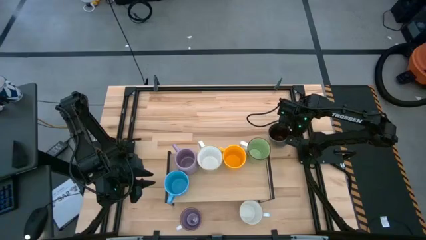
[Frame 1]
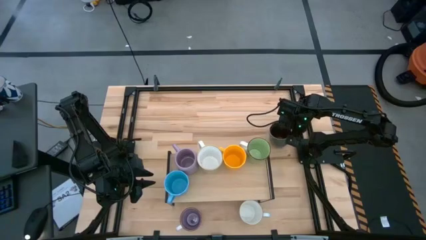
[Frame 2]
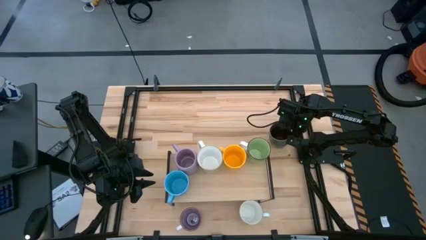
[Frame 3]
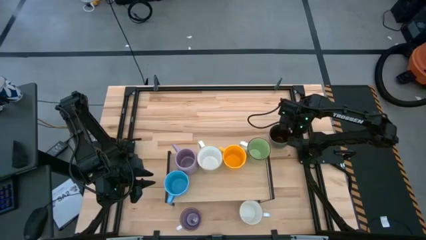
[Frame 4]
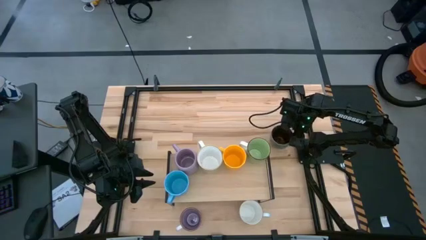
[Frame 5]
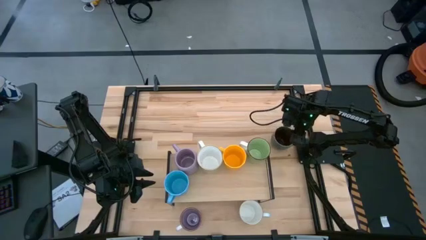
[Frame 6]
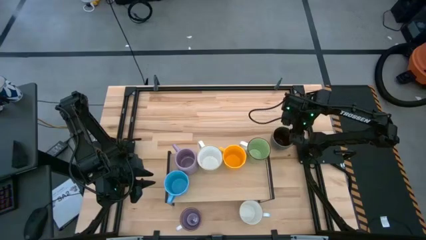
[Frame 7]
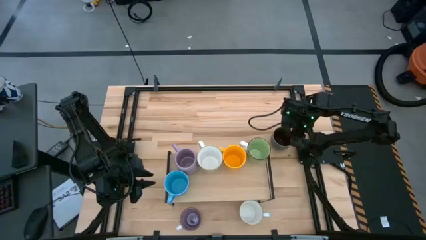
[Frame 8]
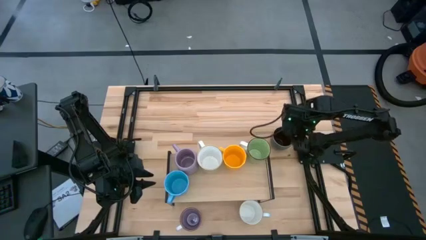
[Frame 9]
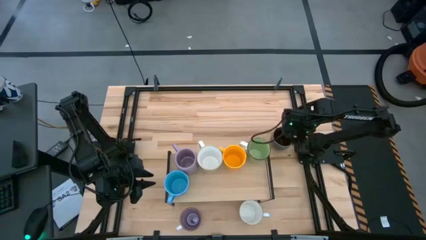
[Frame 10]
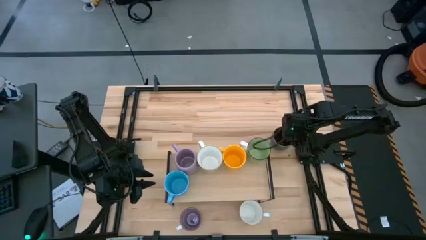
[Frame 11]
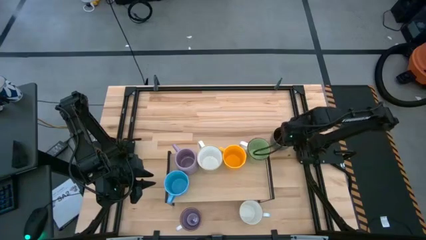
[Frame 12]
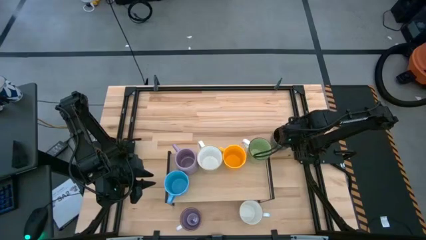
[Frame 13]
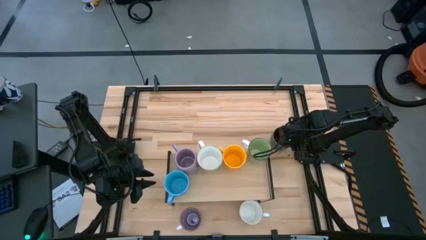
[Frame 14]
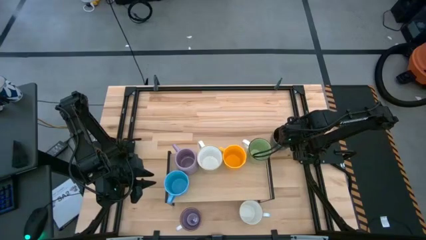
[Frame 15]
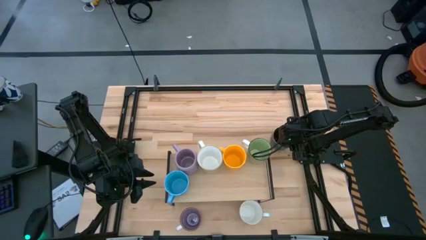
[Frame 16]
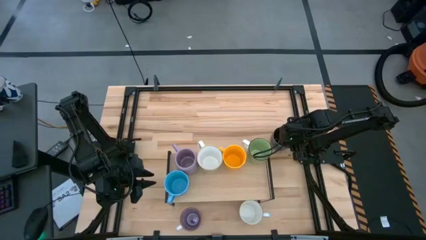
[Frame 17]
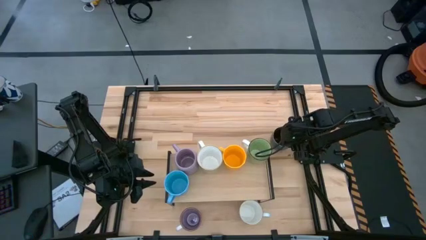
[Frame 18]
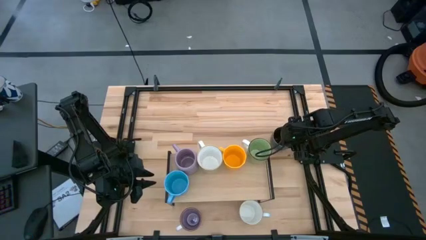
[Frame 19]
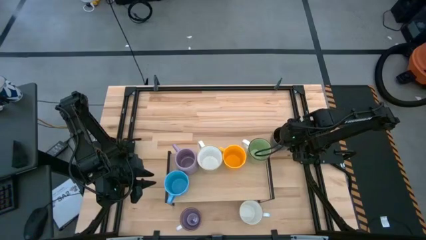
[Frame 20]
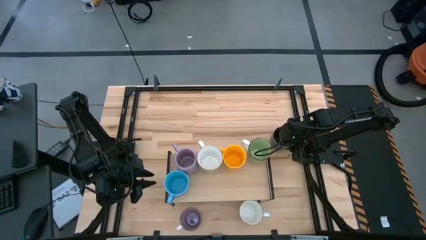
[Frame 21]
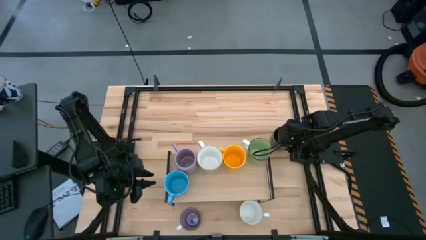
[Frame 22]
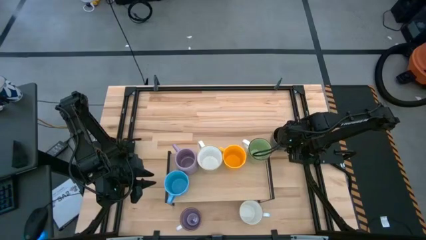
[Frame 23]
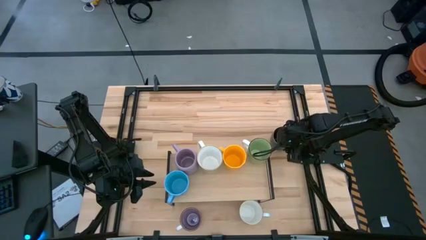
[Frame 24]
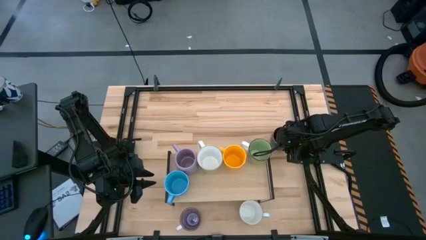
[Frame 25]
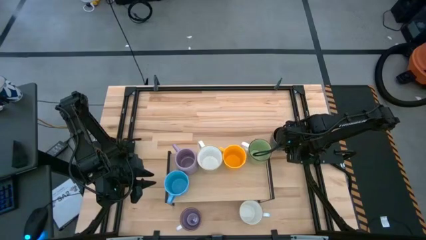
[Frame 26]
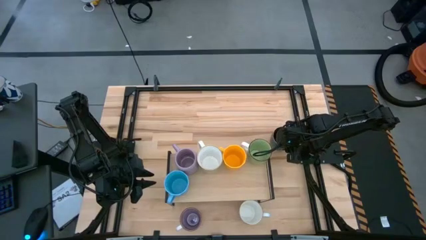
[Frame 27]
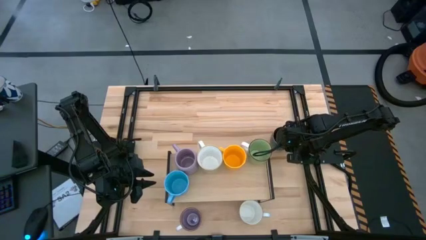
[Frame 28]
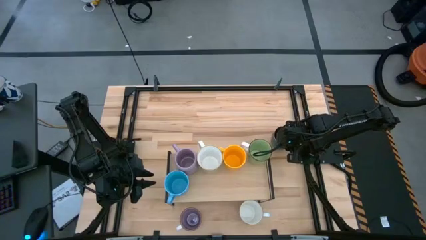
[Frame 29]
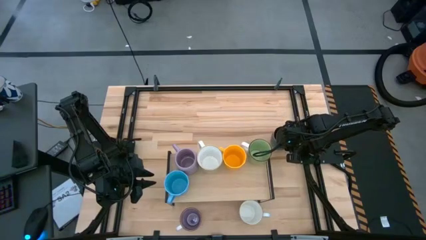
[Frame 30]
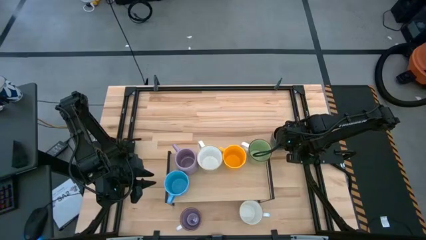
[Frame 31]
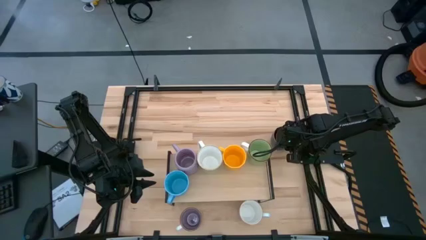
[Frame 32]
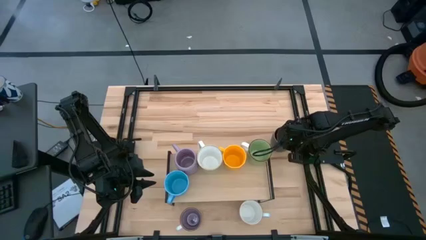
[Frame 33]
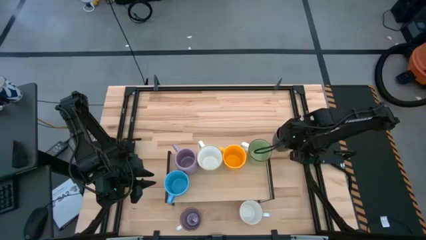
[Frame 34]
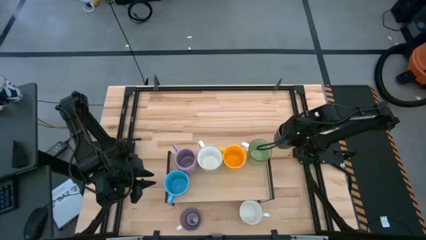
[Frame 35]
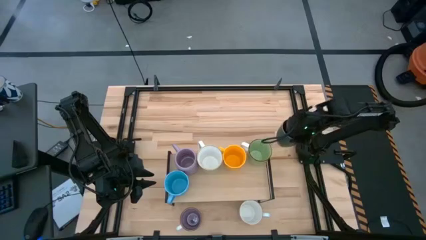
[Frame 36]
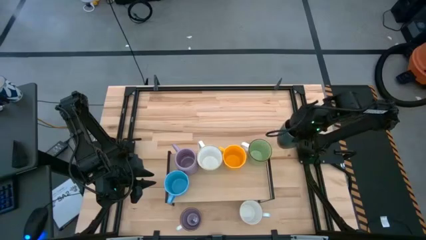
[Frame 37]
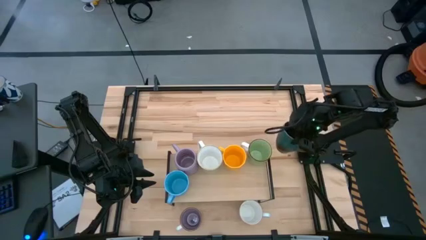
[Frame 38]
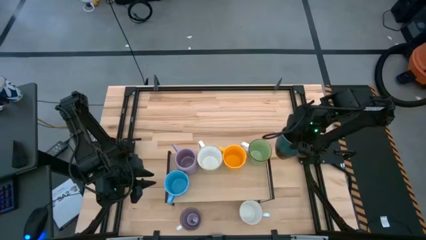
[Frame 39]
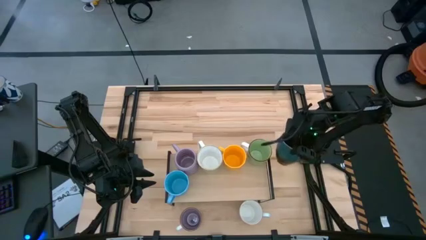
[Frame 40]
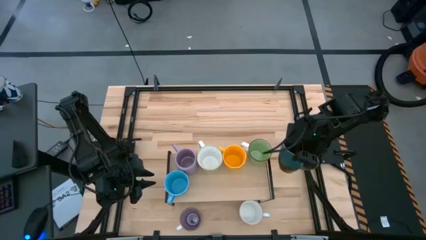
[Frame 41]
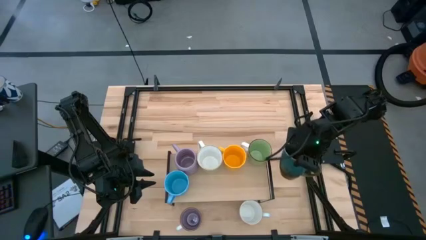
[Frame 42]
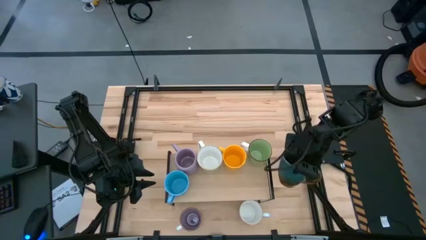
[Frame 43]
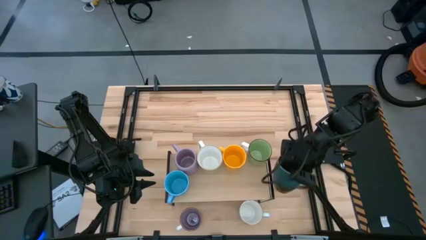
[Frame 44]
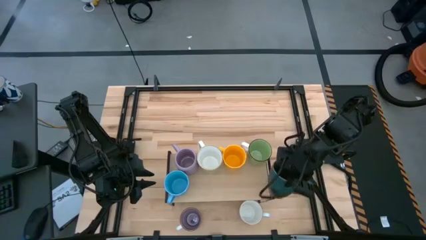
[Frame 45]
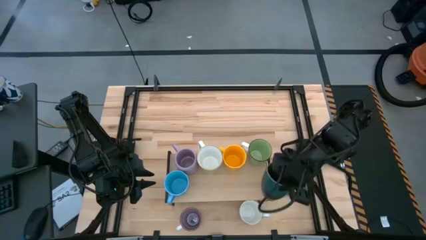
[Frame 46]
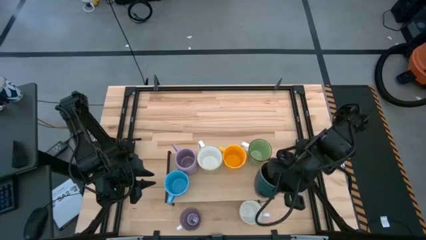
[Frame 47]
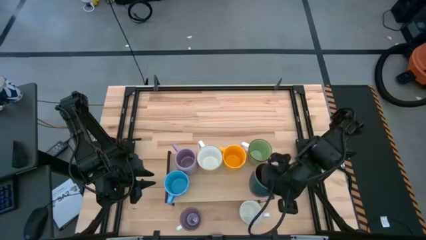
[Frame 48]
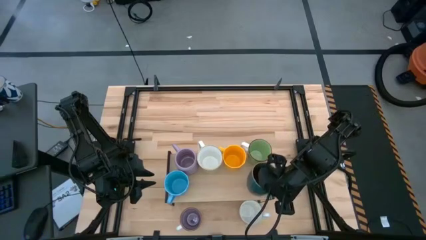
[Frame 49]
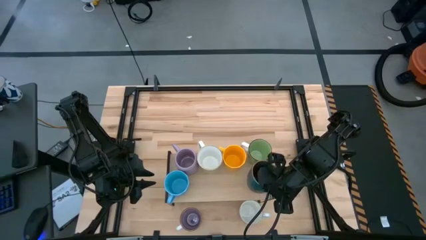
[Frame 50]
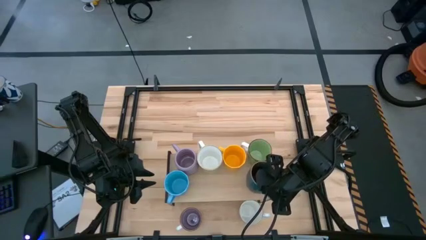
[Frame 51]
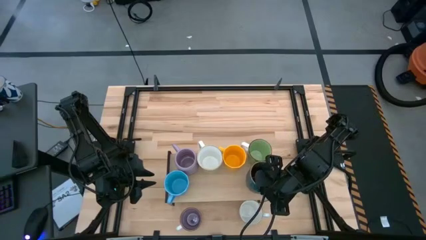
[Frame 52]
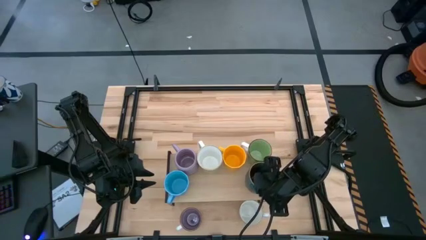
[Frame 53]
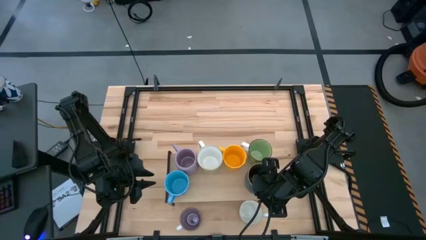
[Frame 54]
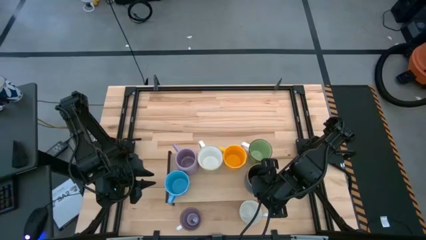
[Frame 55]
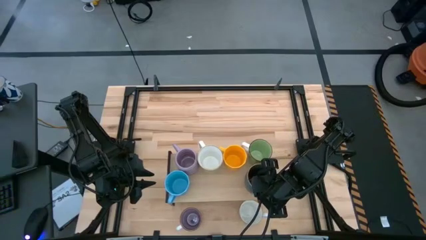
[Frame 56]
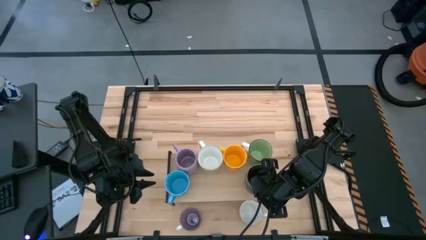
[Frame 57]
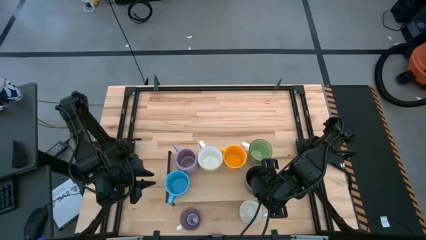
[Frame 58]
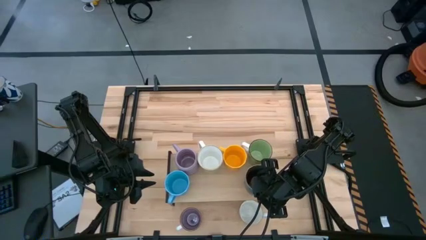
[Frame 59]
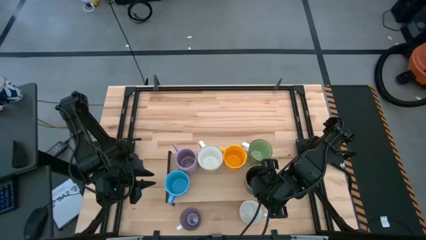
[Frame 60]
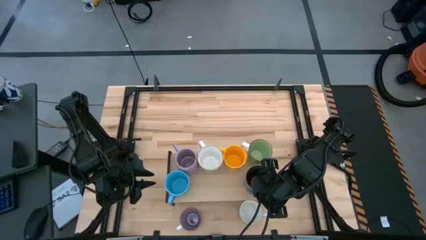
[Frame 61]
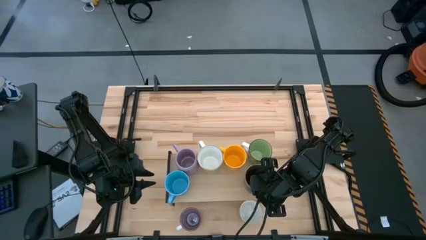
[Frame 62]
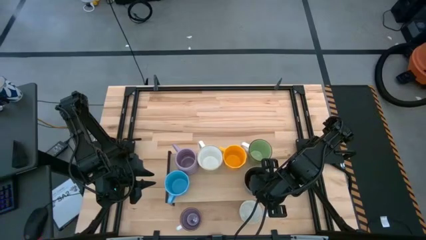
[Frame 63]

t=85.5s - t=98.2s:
Task: Place coffee mugs
Put the brown blue mug on the shelf

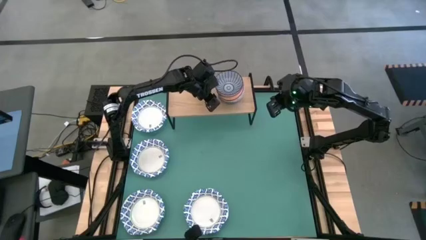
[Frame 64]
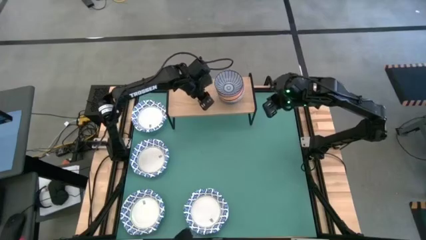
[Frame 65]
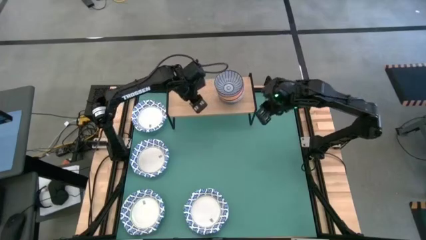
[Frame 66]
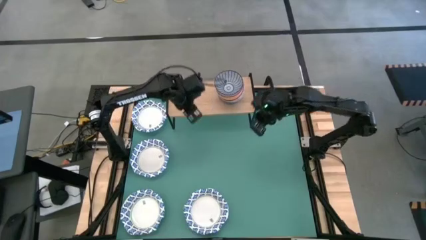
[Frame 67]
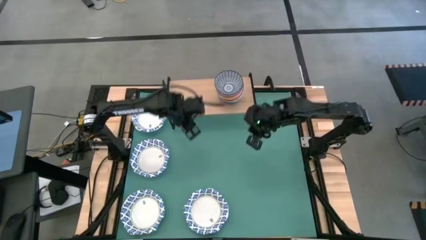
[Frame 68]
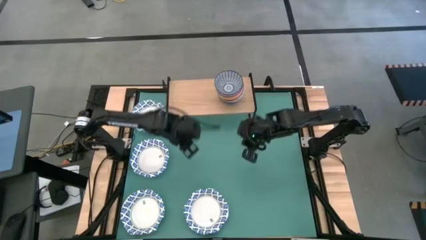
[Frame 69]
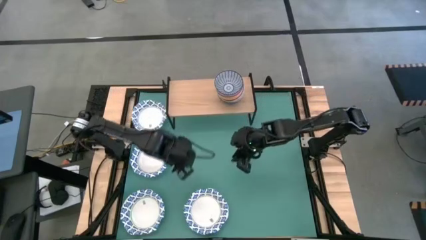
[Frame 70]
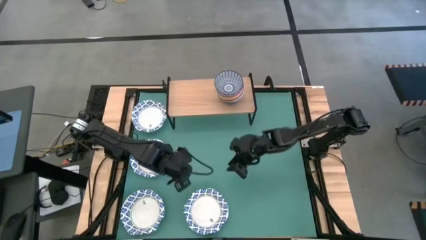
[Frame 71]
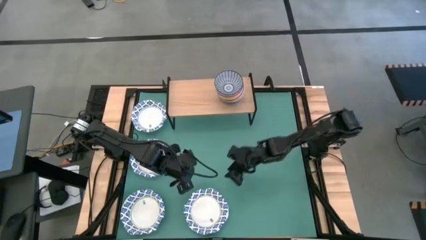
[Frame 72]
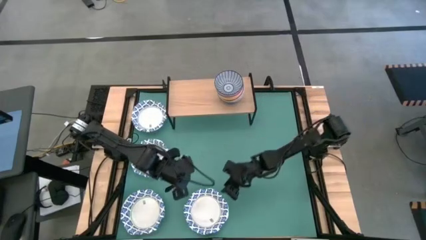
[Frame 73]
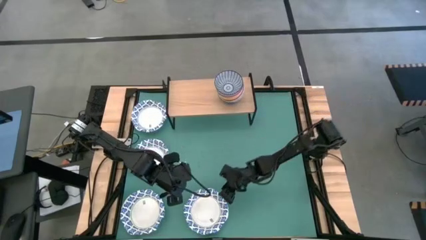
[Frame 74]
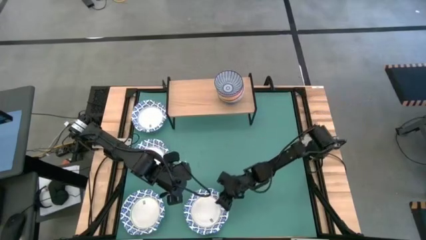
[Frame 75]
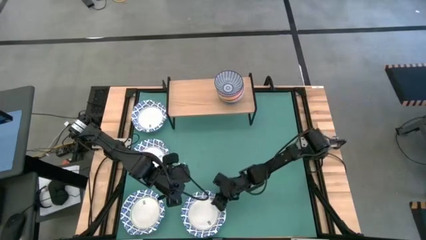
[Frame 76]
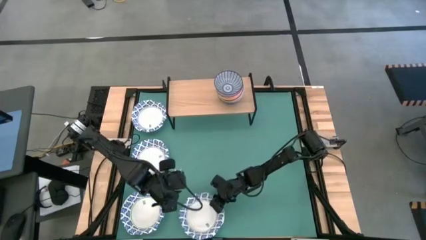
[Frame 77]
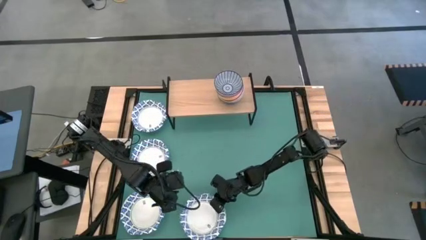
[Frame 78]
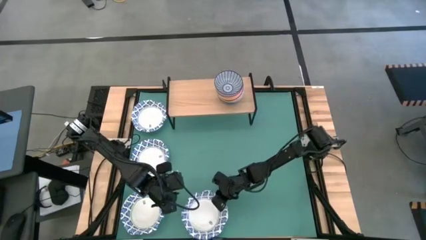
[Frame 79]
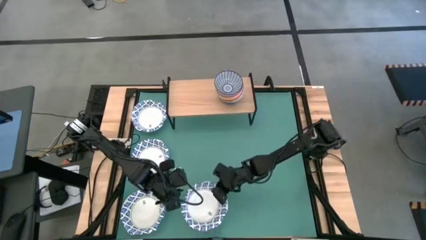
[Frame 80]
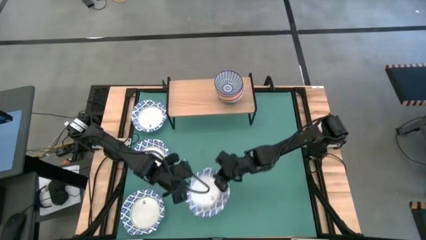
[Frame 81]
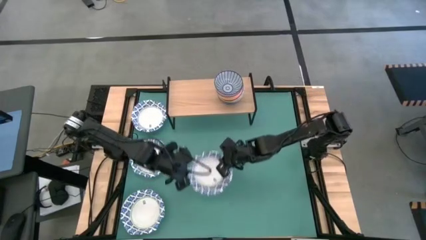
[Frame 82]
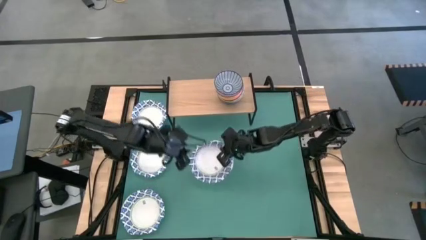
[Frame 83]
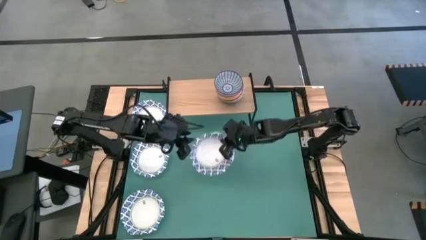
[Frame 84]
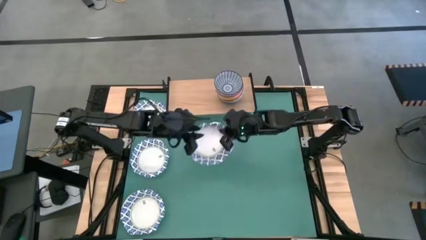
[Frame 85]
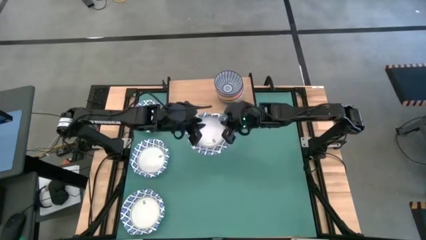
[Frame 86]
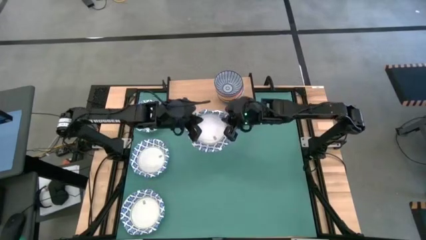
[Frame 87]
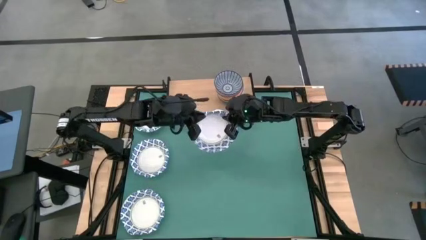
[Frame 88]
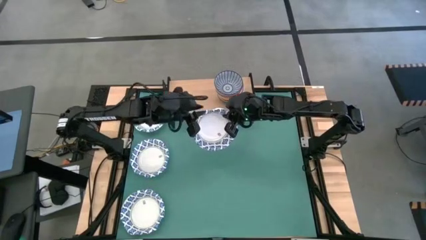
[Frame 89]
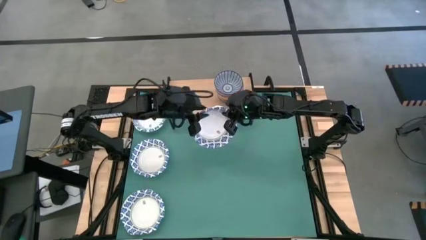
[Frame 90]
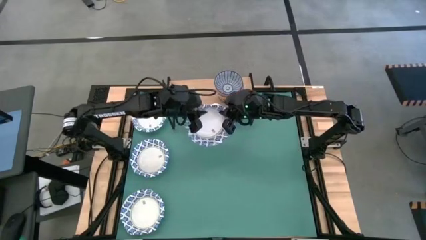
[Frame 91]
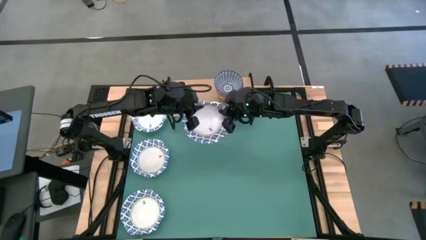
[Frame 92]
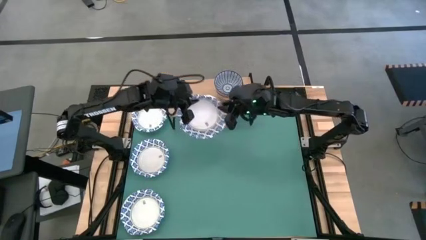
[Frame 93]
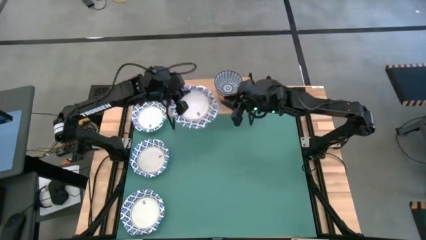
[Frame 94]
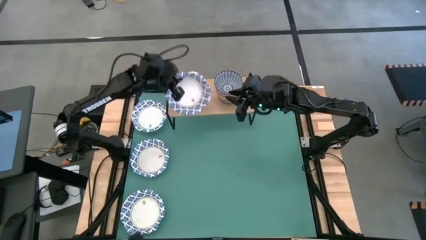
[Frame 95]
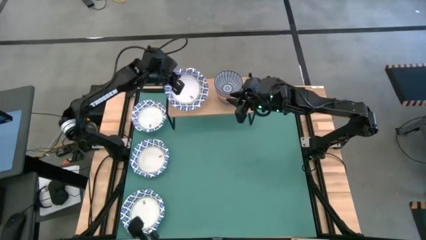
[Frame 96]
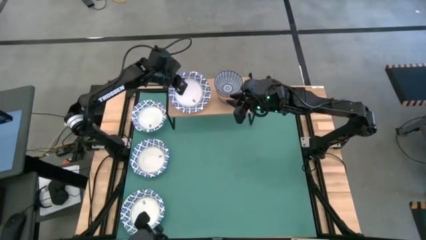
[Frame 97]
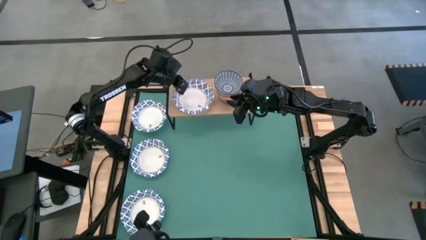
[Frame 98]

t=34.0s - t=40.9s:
Task: Place and stack bowls onto a shelf
Put the large white bowl on the shelf
